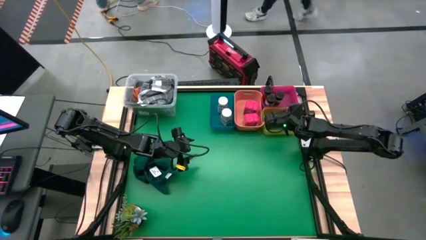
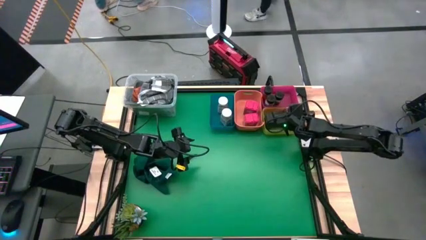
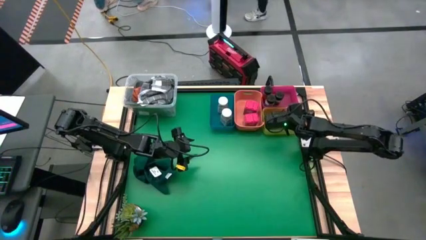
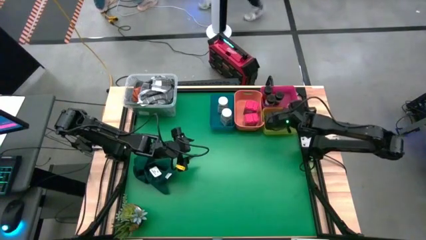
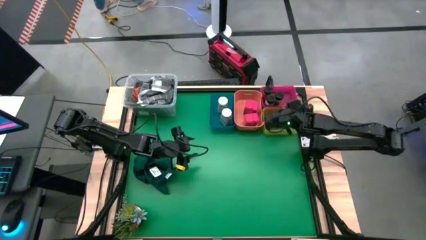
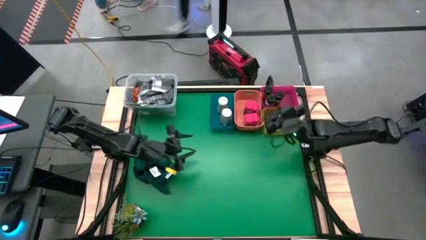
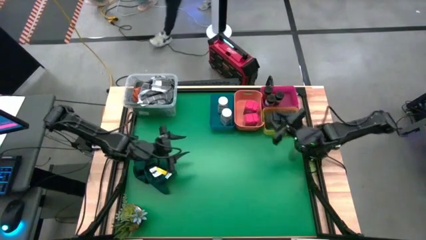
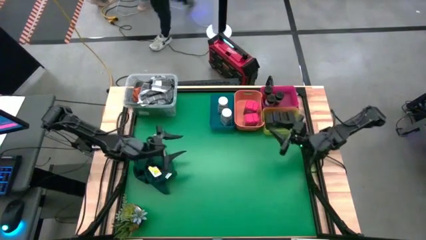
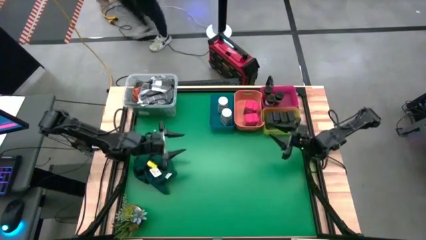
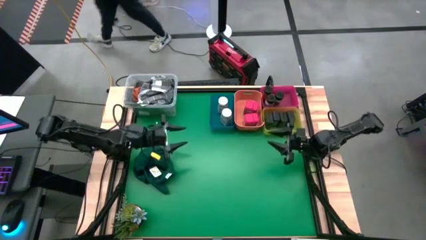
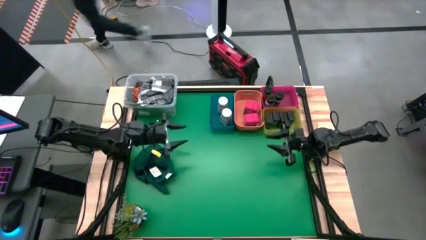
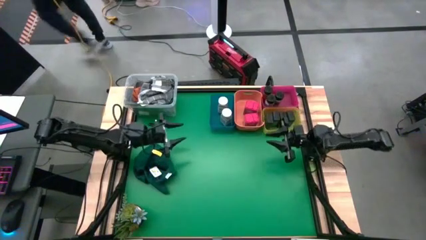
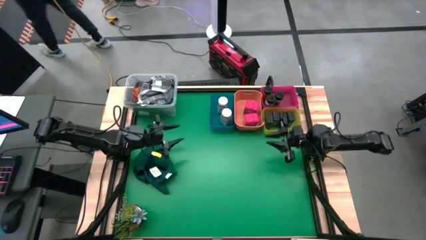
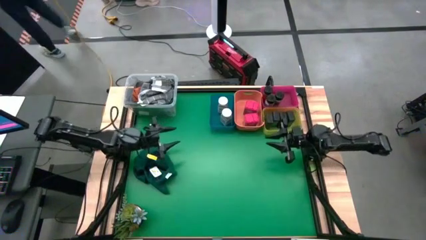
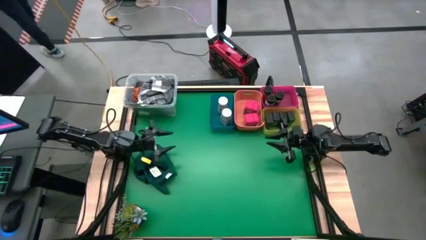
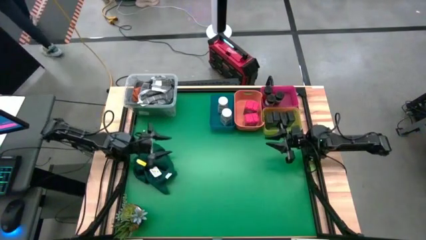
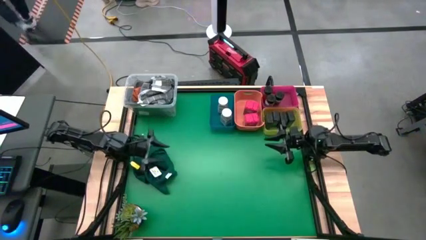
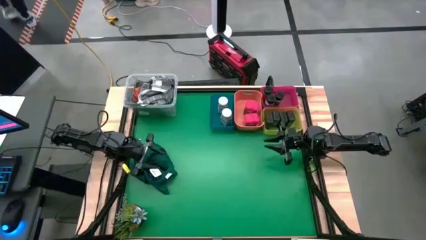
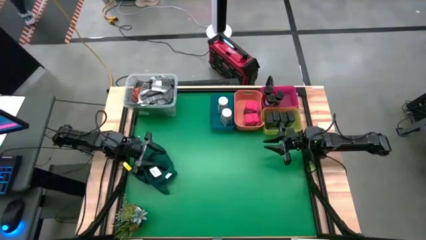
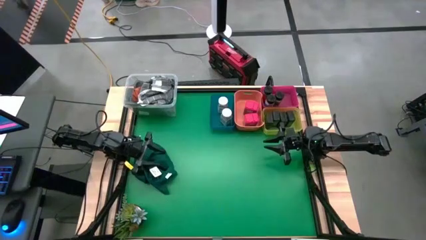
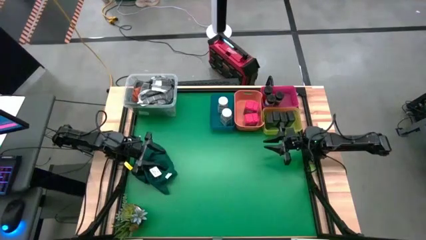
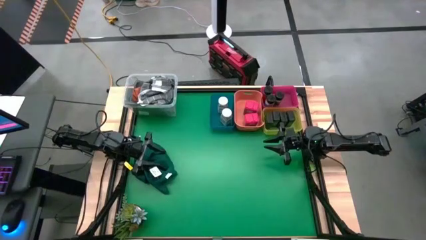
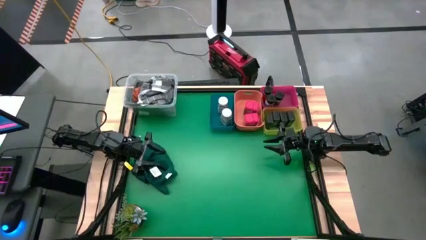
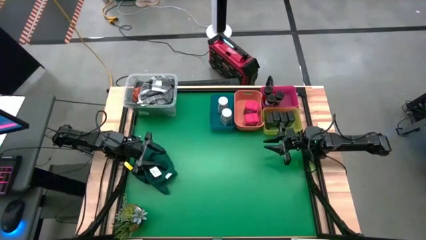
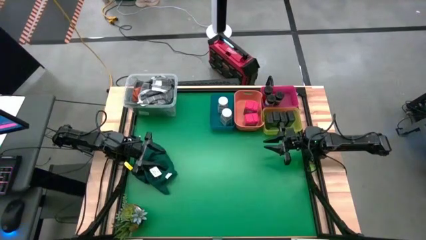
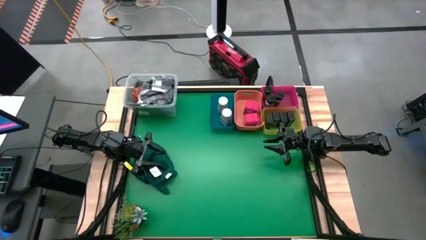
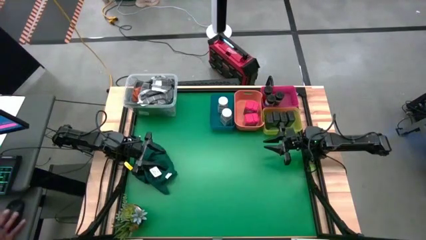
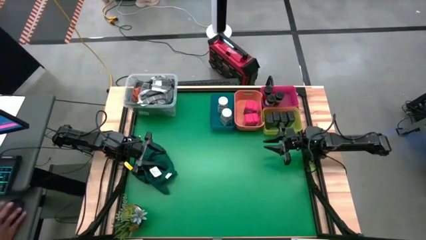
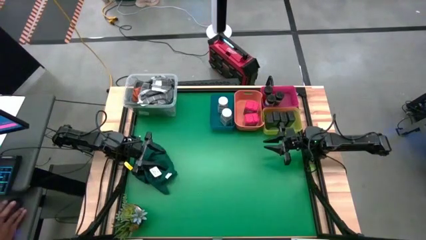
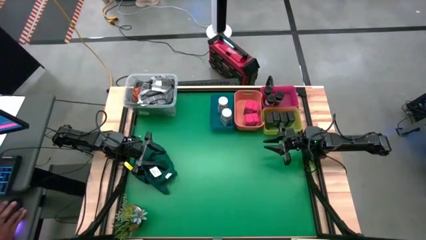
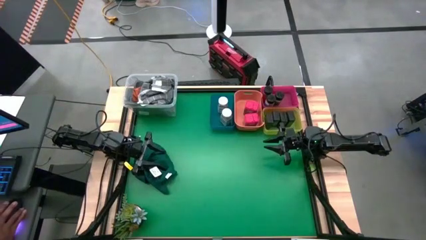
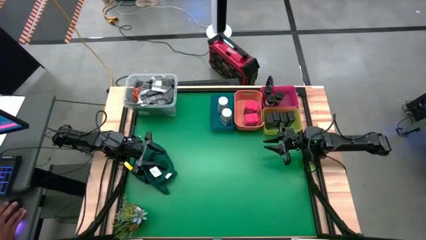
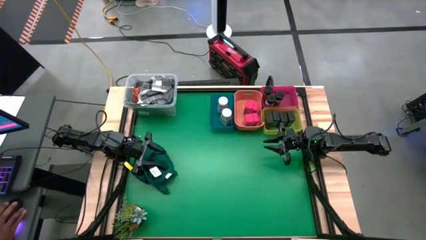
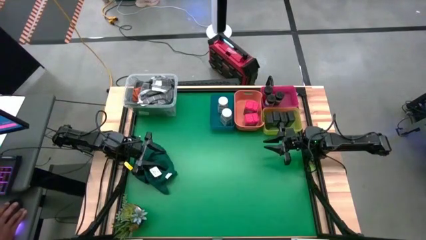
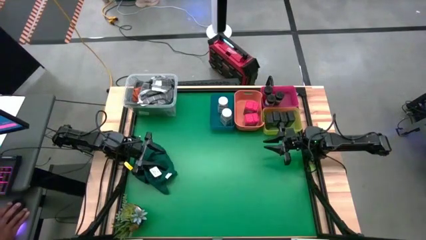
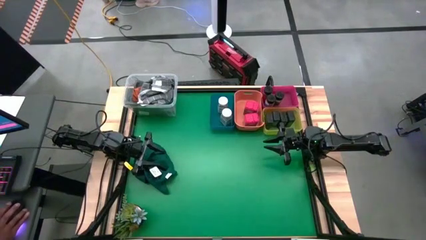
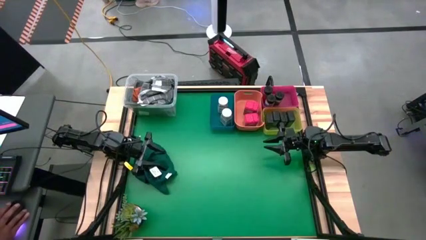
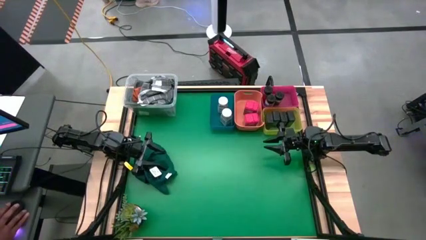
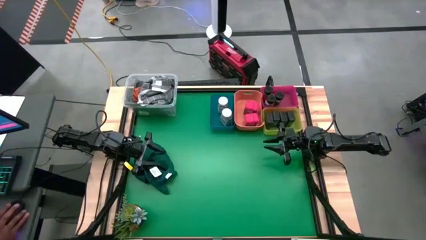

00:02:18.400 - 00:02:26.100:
Task: Sort spices by type
Return to Home Position

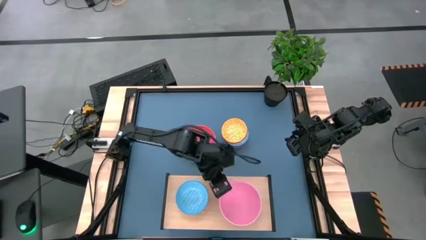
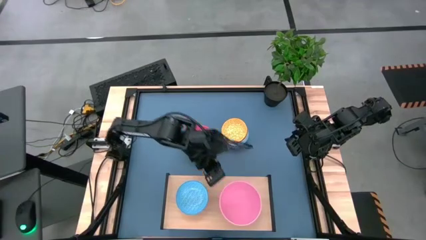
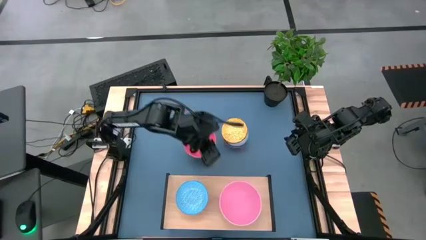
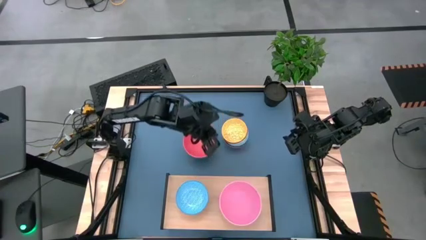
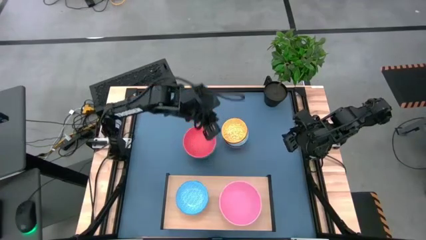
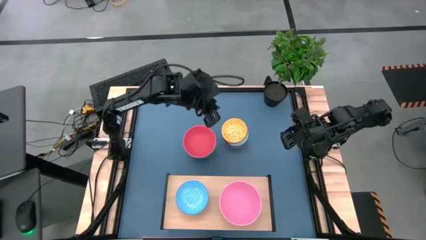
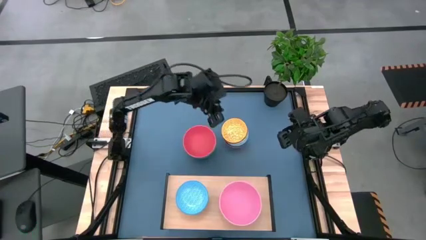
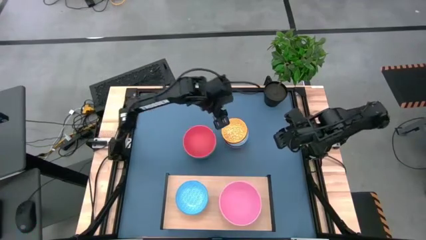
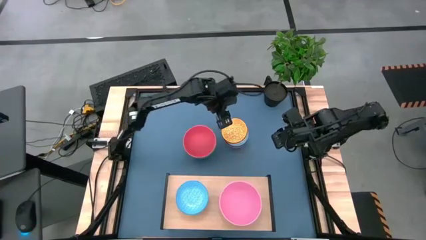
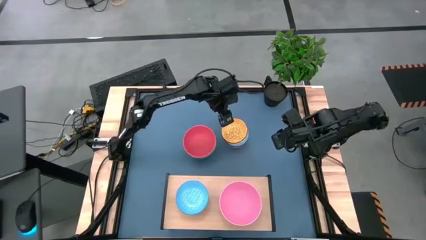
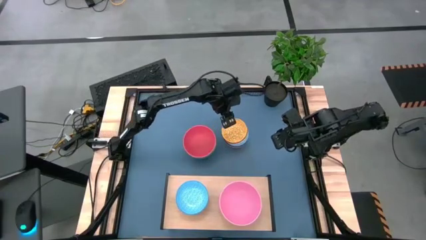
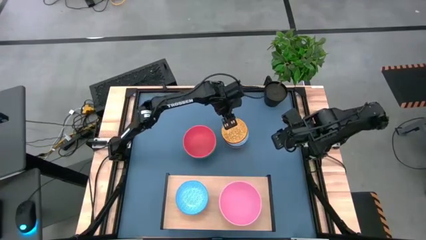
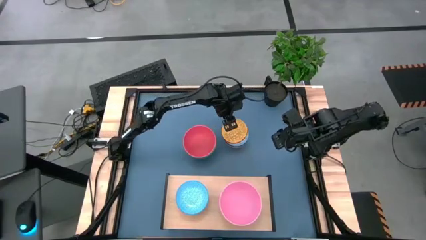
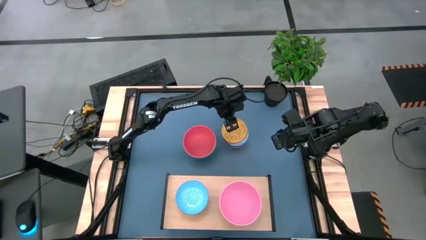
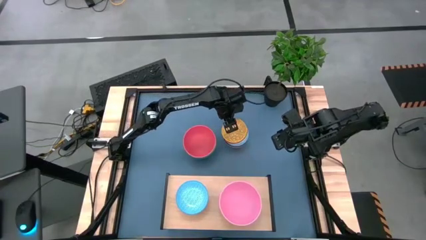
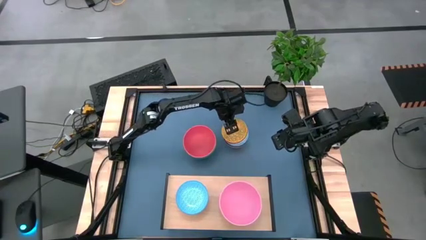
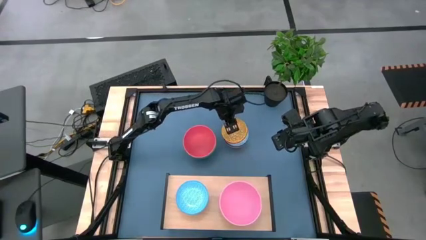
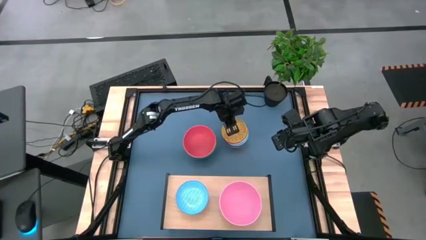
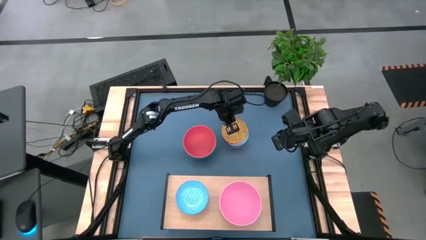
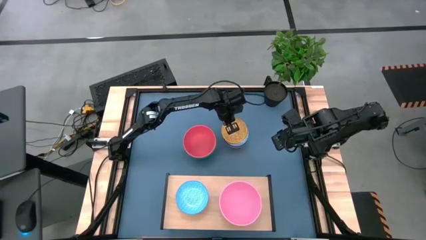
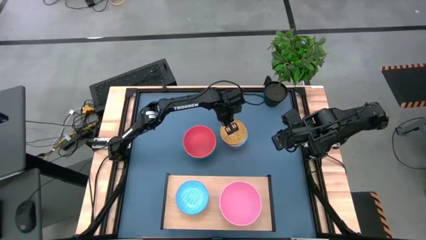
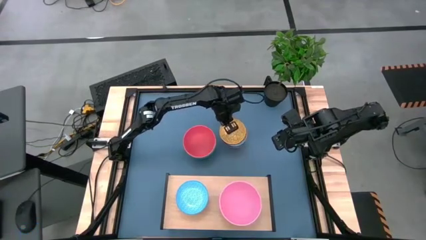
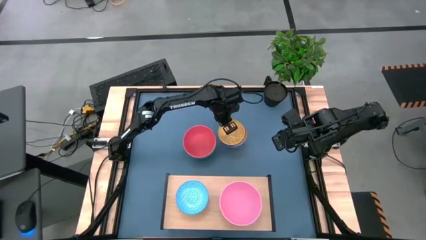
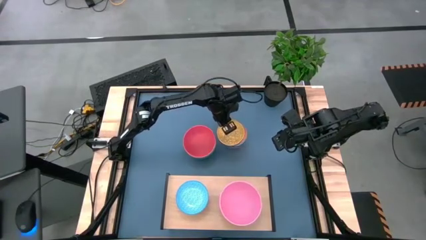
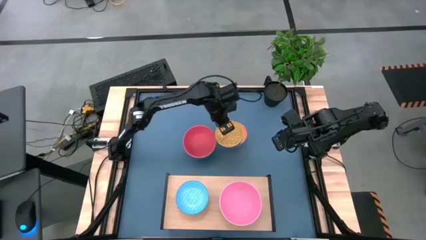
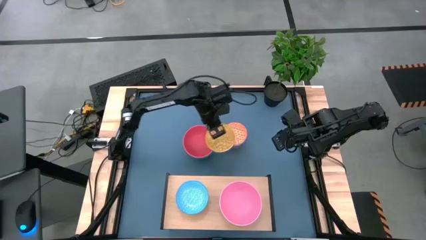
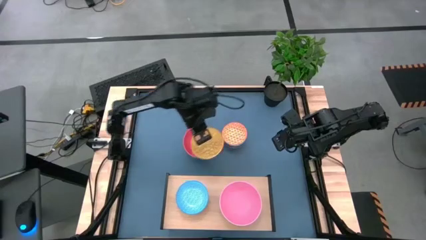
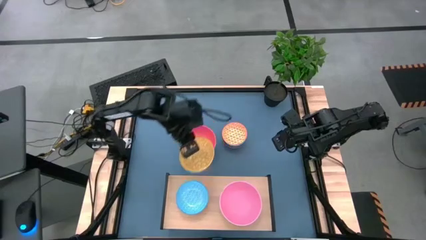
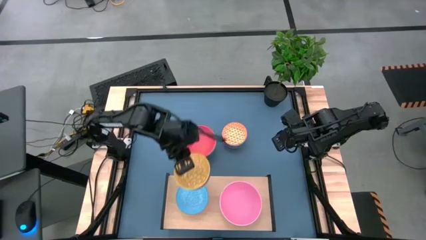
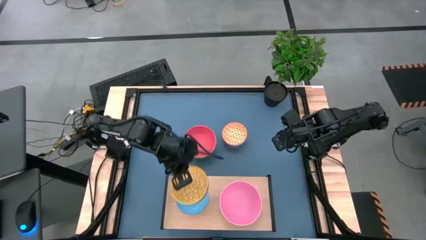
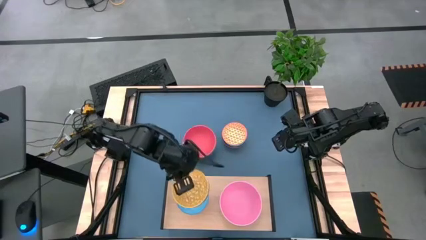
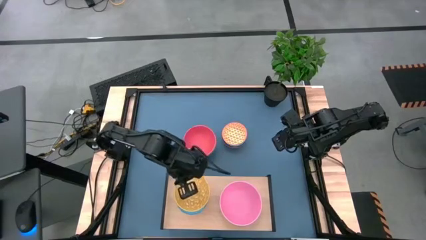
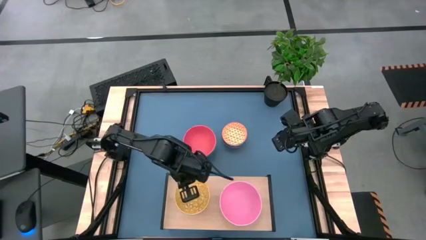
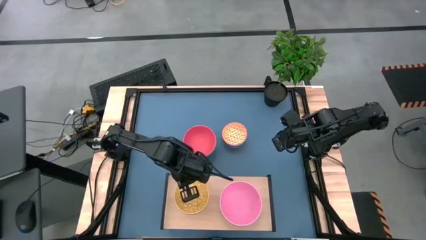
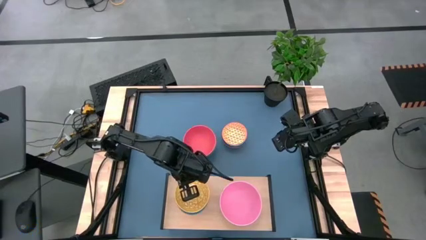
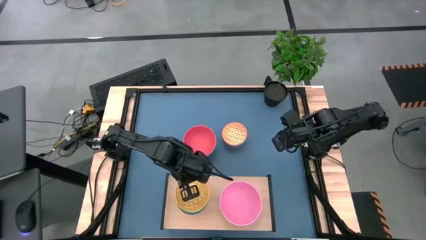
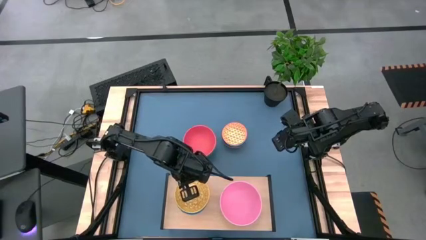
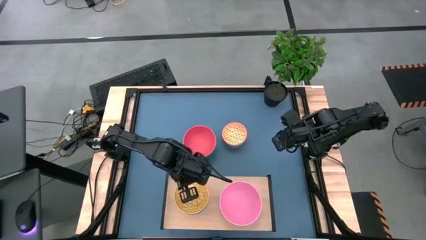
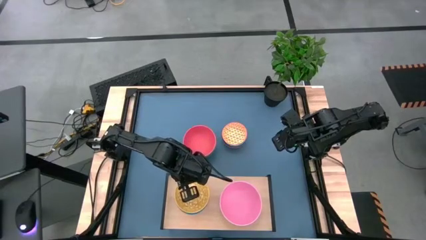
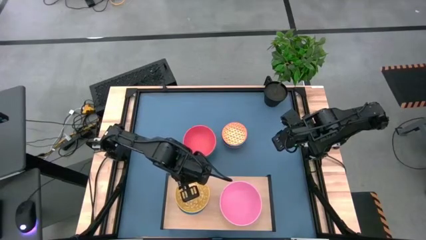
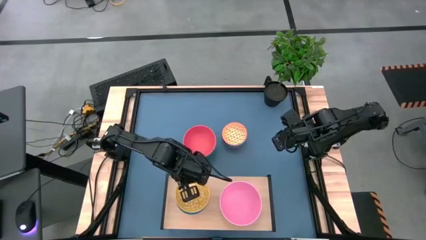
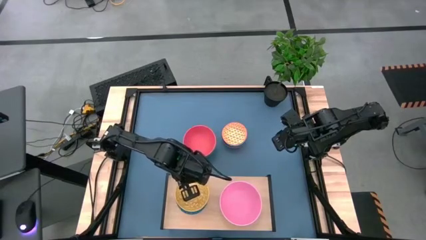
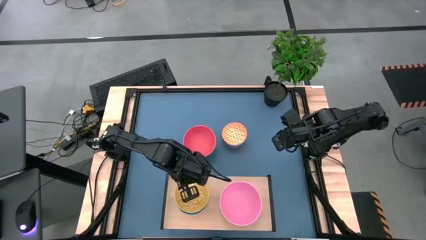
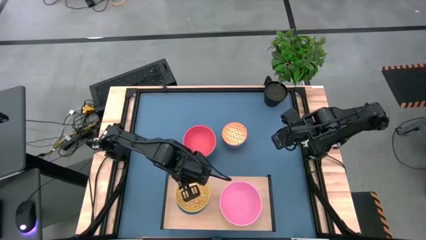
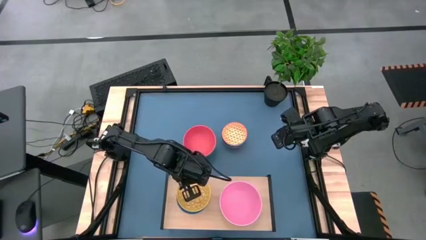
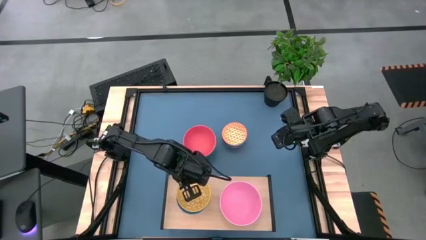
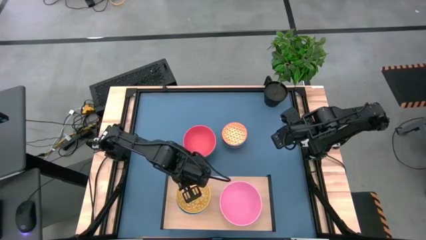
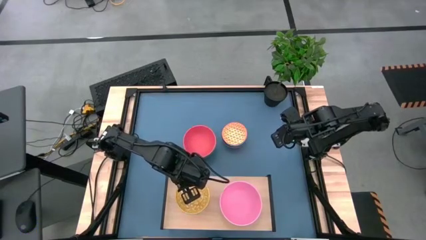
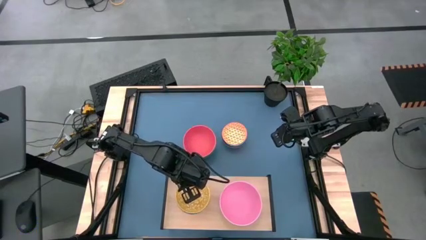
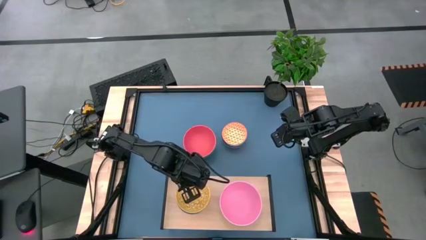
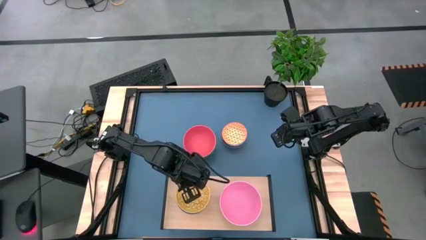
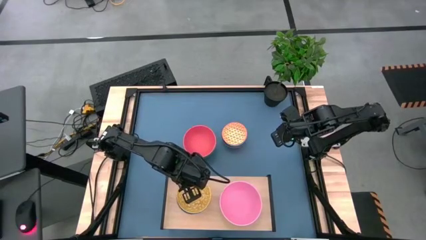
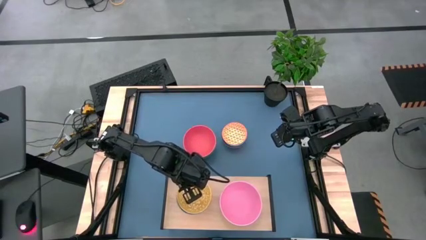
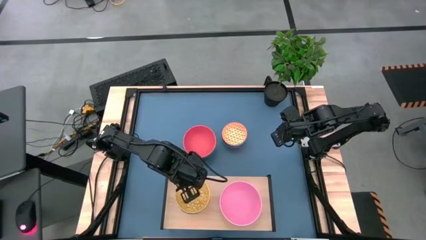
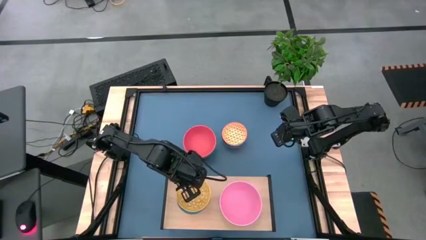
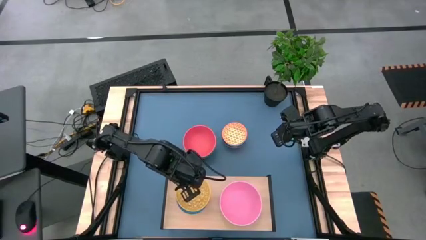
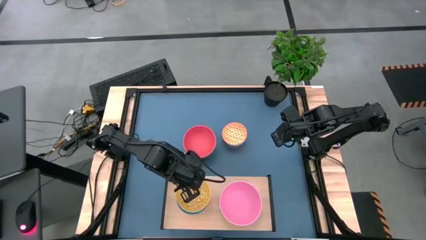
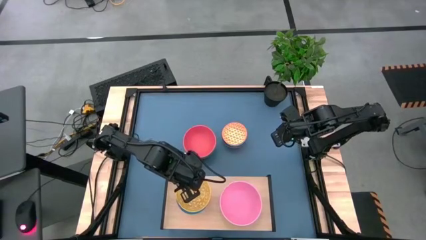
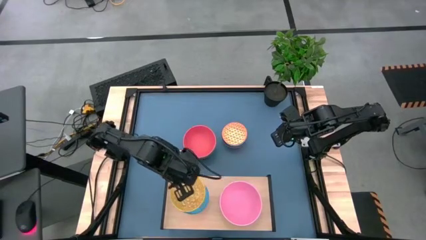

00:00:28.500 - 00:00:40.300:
Task: Place and stack bowls onto a shelf
Stack the yellow bowl on top of the light blue patterned bowl on the shelf
